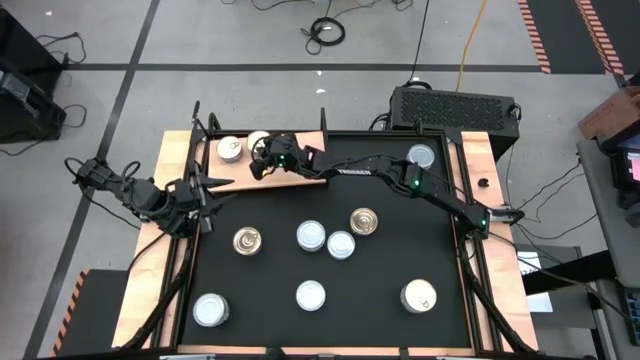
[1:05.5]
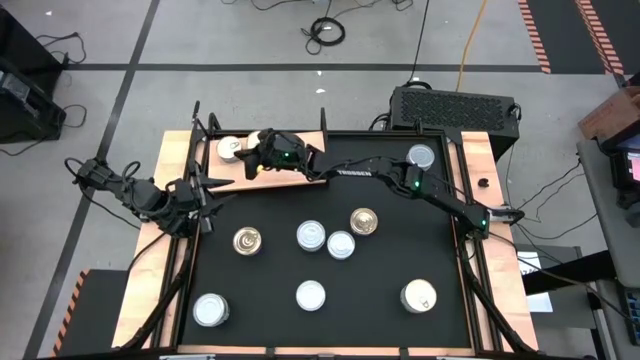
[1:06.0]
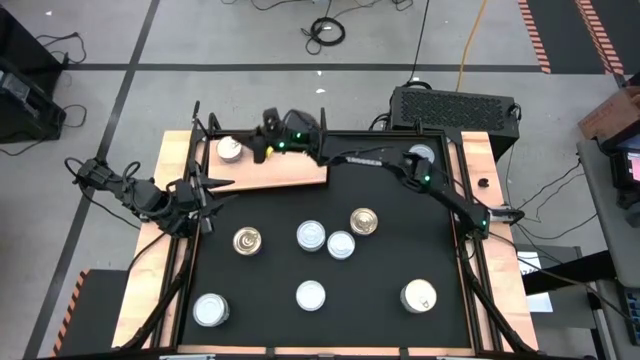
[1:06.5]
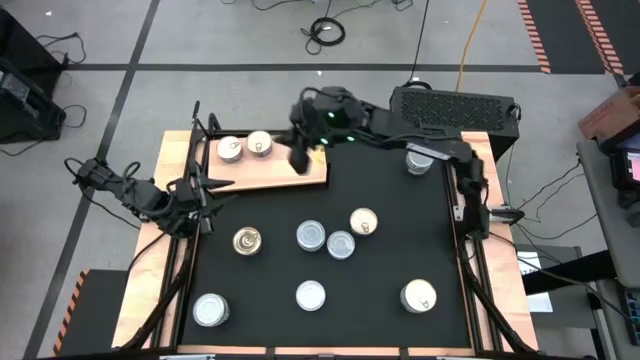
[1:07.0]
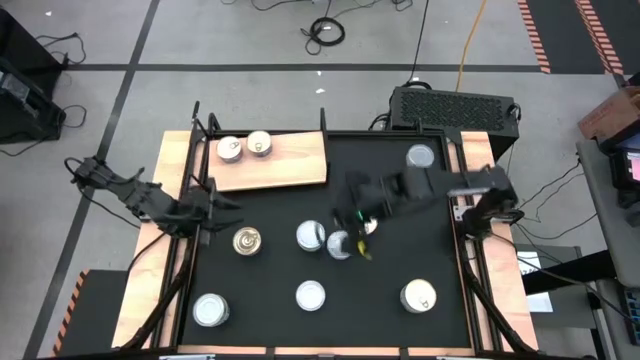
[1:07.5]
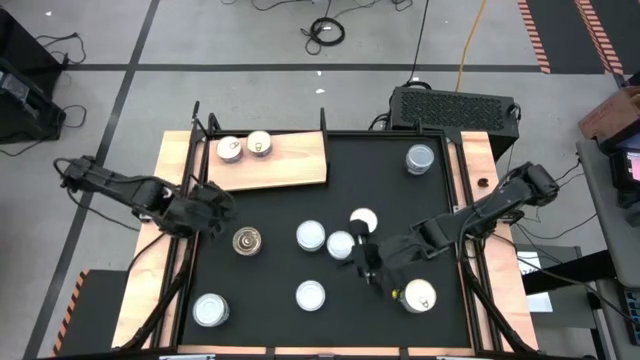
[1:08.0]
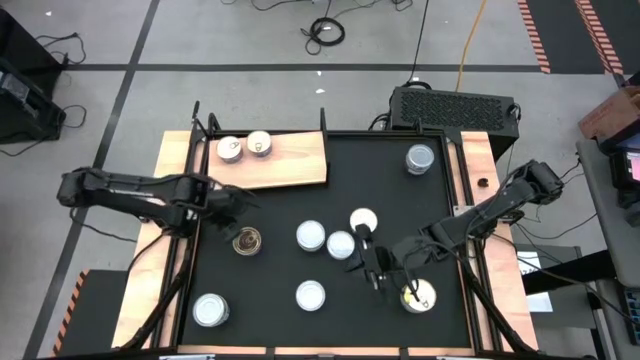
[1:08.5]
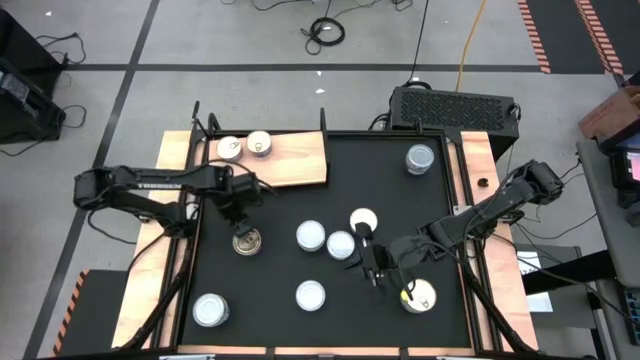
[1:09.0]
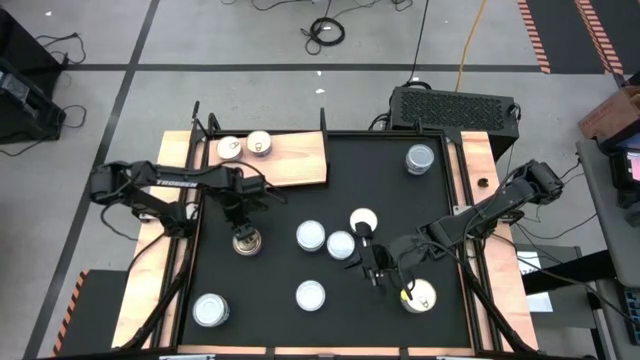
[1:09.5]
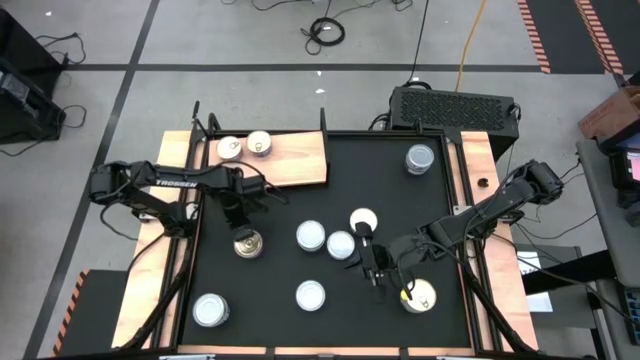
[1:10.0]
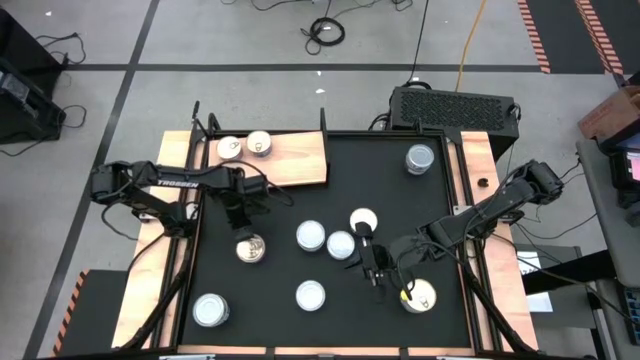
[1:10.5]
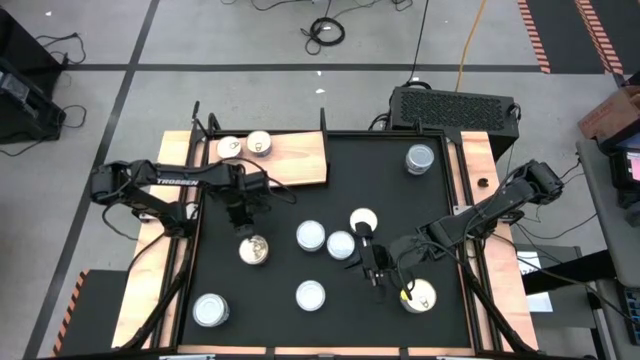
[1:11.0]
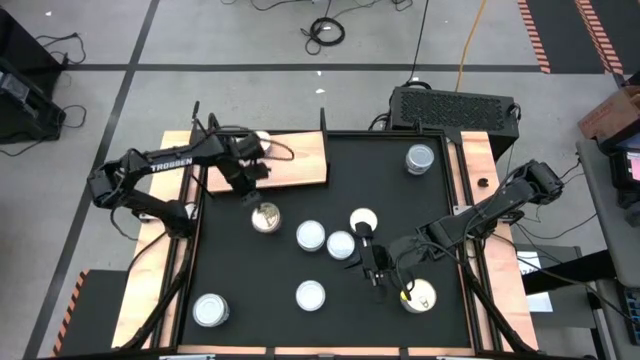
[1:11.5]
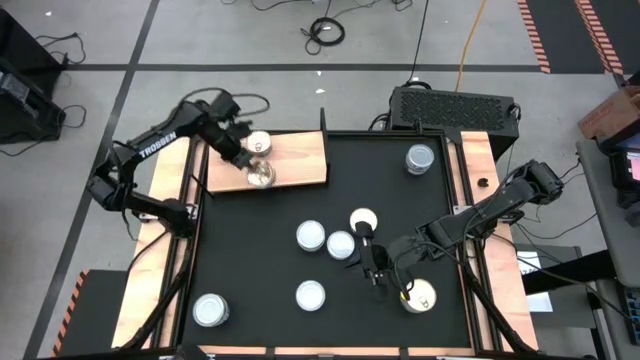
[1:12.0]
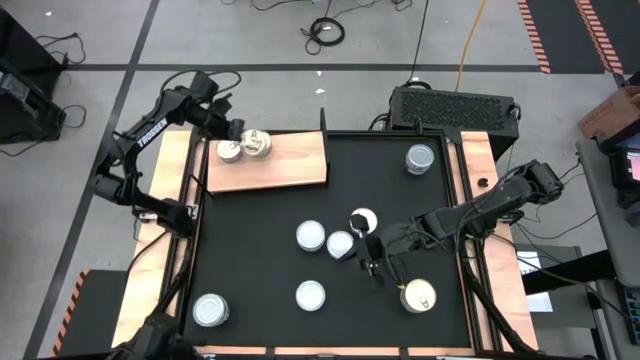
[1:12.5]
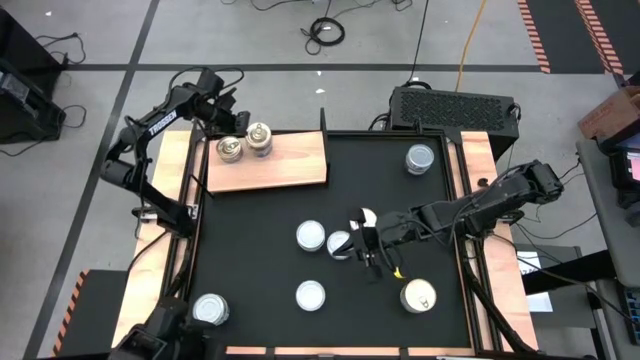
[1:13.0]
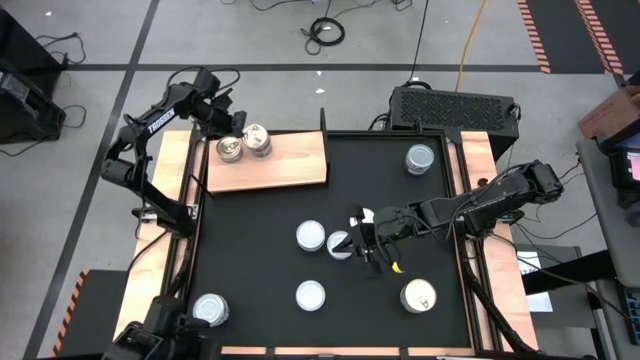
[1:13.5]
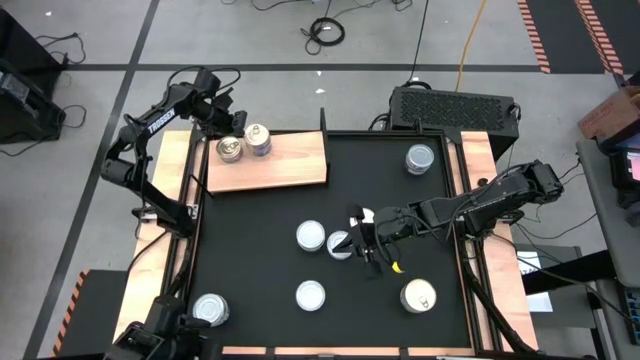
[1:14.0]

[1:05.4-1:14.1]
Task: Stack canned seafood by type on shelf
Stack the blue and pink tuna can on top of the right blue and pink tuna can on the shelf

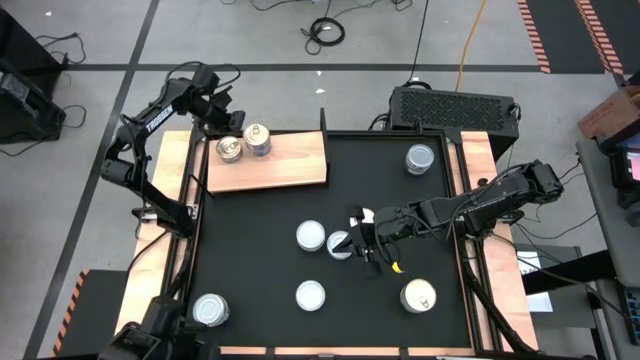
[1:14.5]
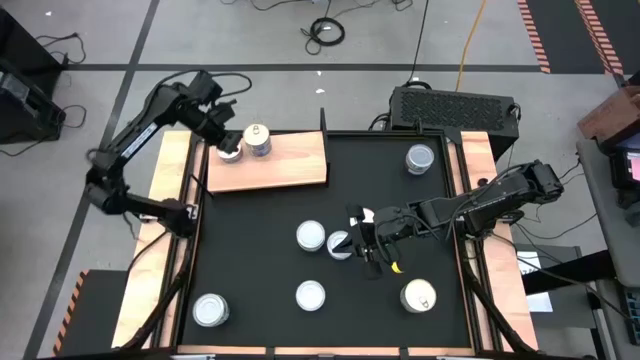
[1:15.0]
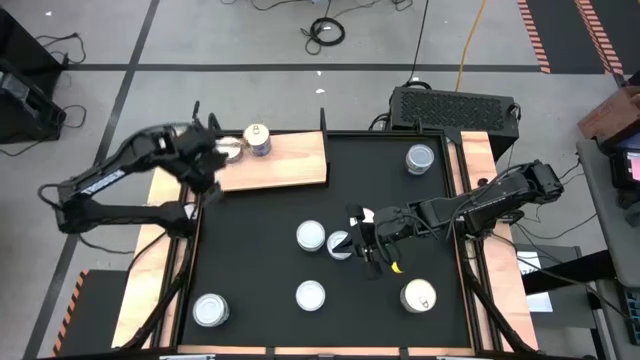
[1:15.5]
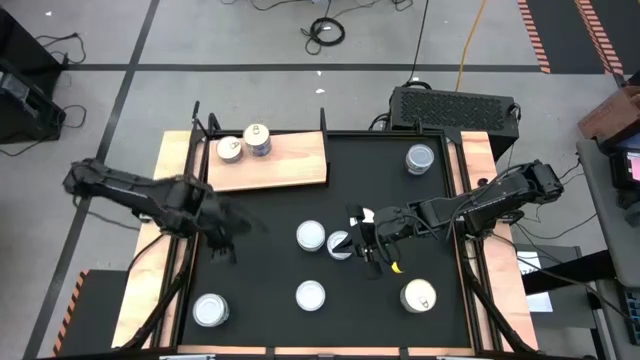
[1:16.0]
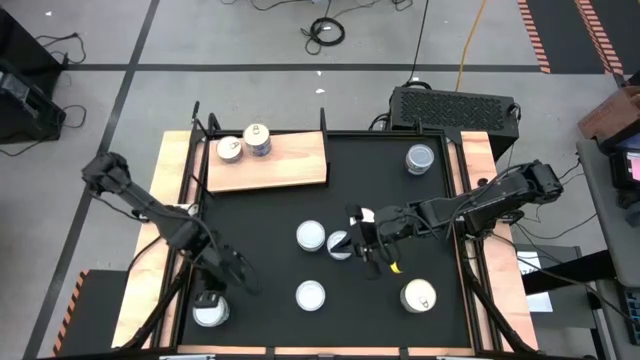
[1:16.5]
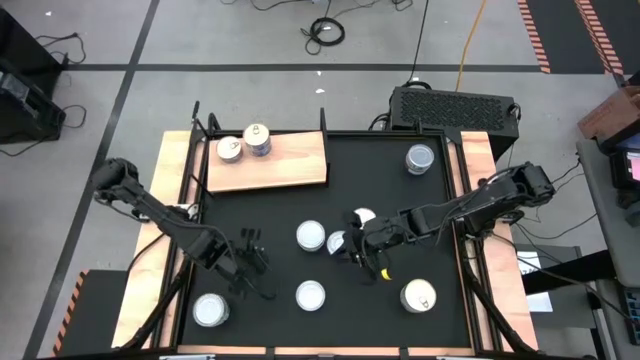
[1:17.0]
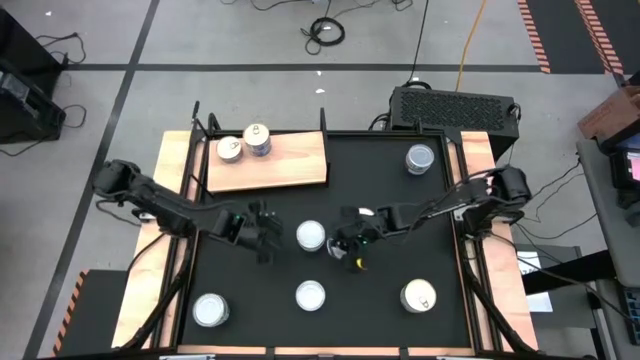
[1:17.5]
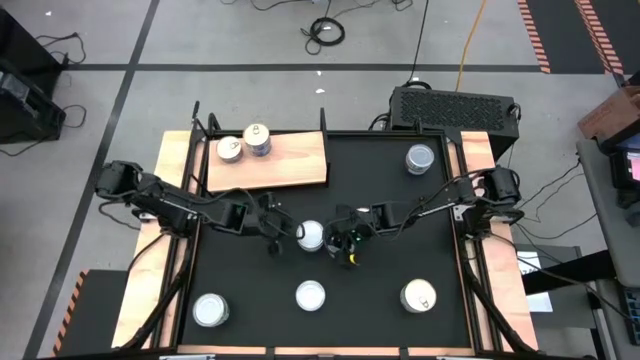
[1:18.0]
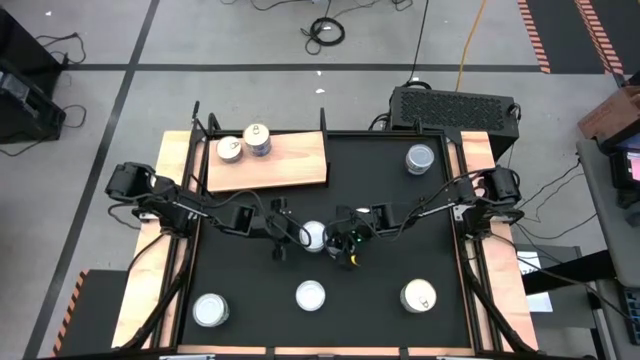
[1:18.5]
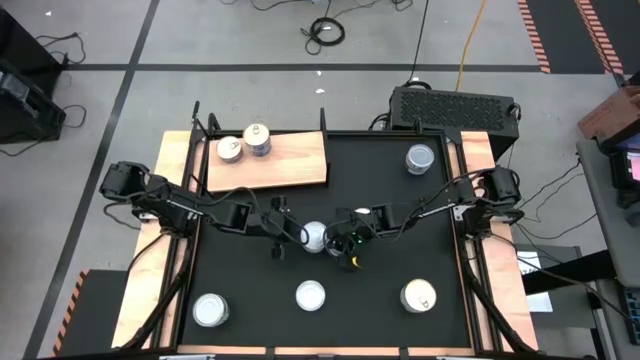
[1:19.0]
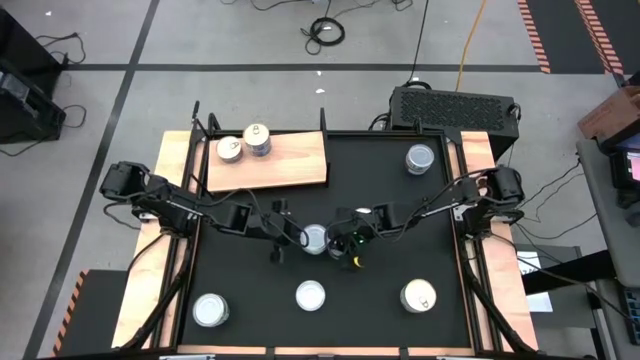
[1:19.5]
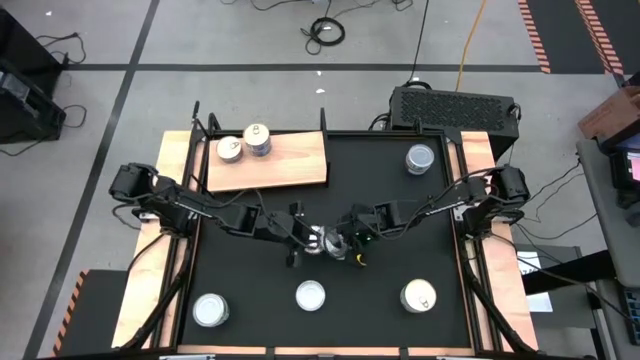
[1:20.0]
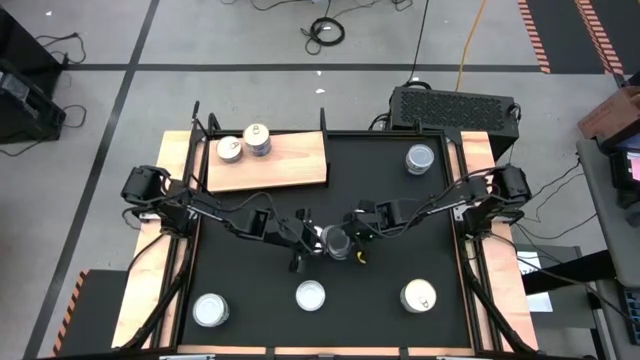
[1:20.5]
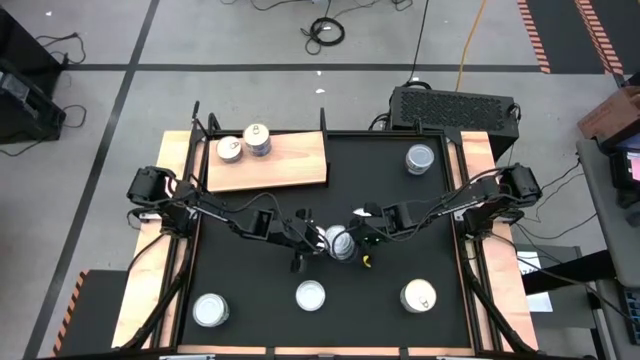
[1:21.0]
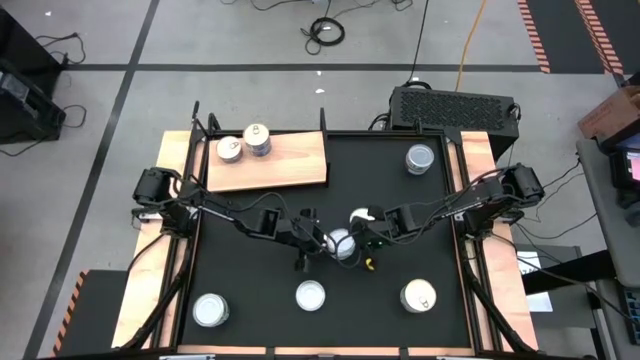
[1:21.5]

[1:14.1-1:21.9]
Remove the green and white tuna can on top of the green and white tuna can on the table

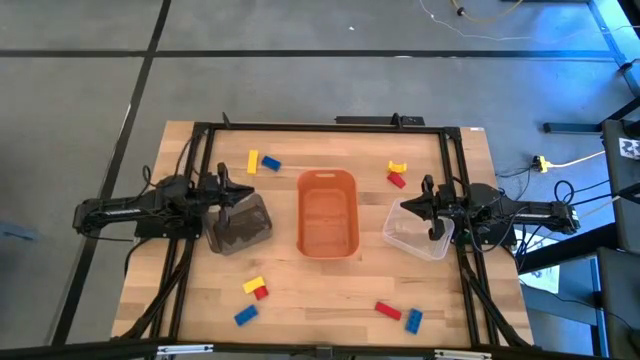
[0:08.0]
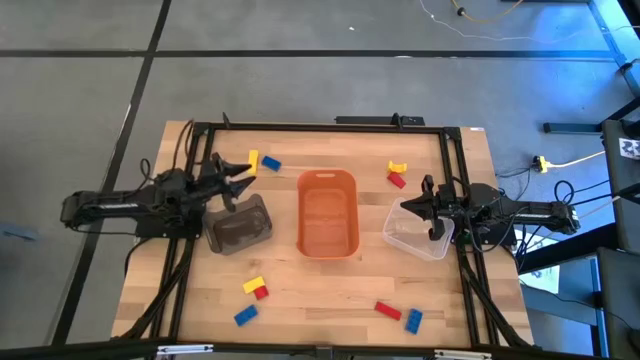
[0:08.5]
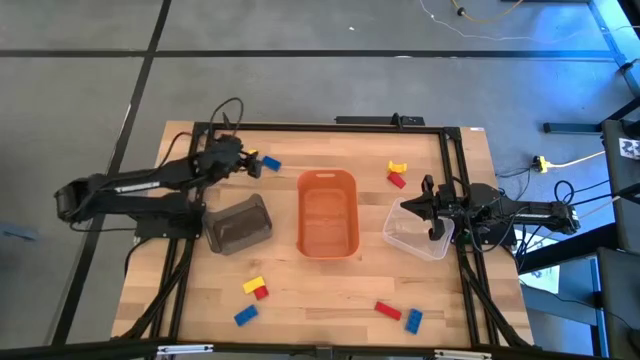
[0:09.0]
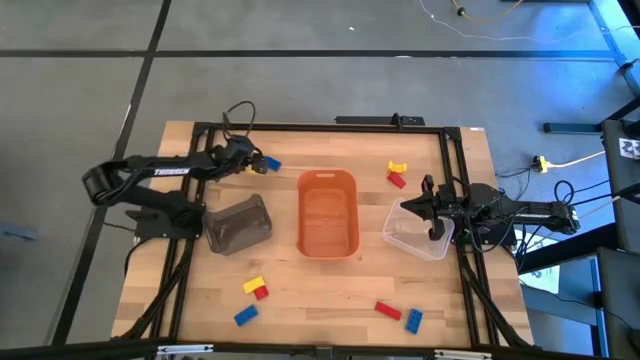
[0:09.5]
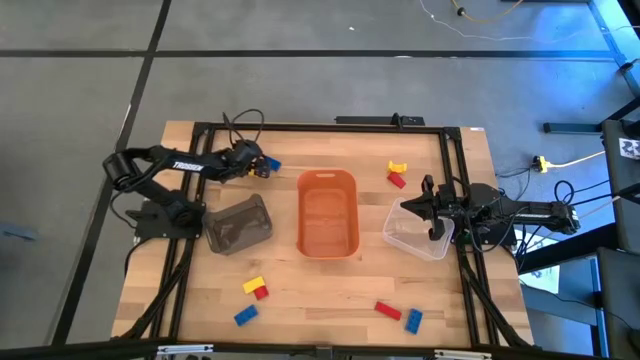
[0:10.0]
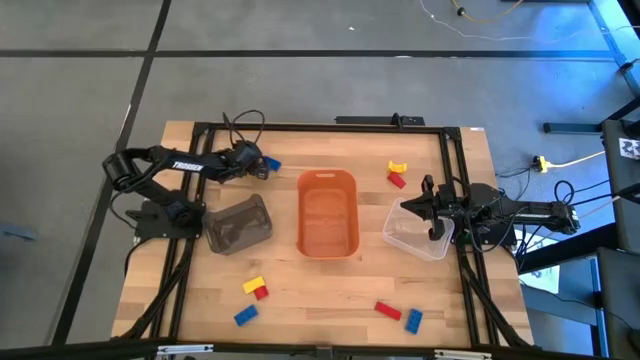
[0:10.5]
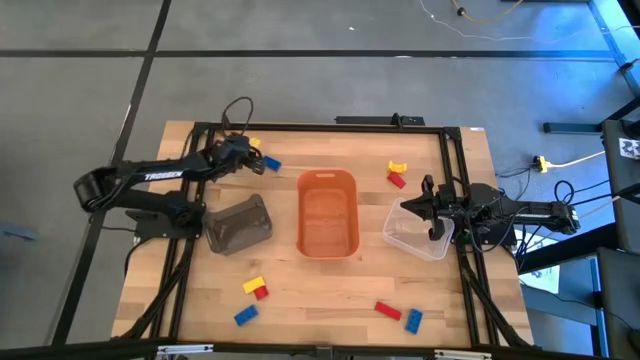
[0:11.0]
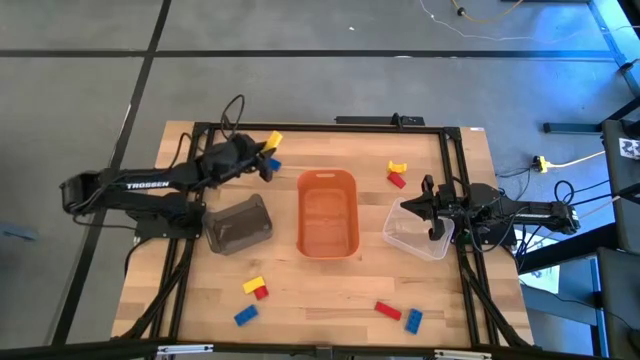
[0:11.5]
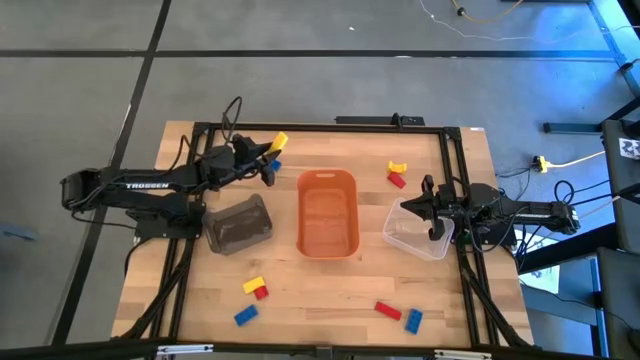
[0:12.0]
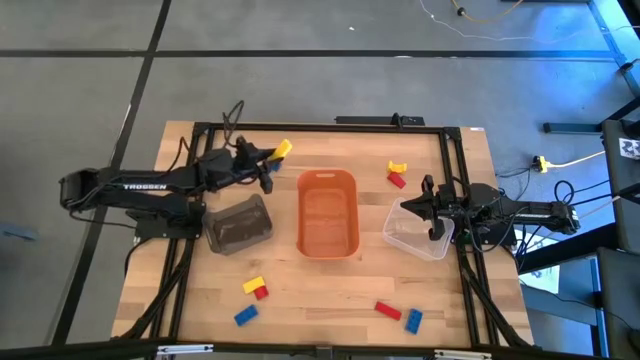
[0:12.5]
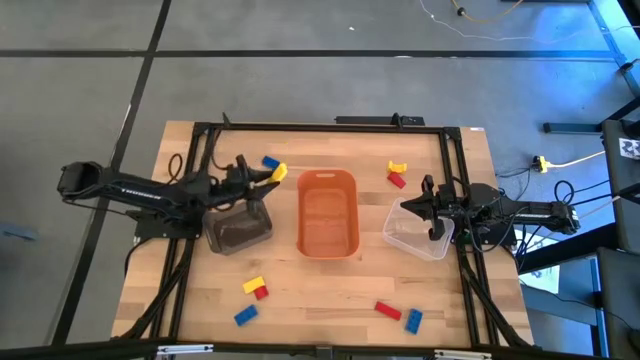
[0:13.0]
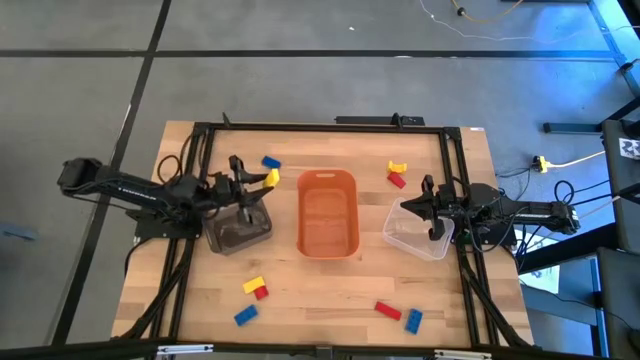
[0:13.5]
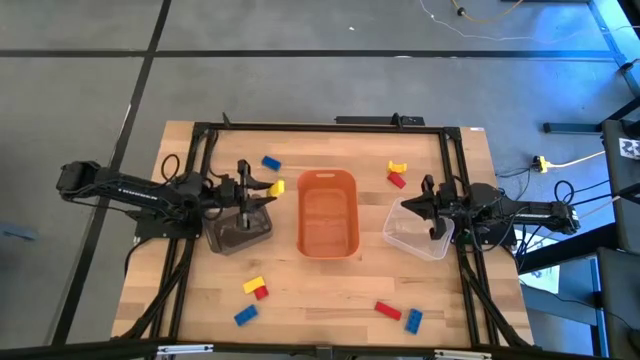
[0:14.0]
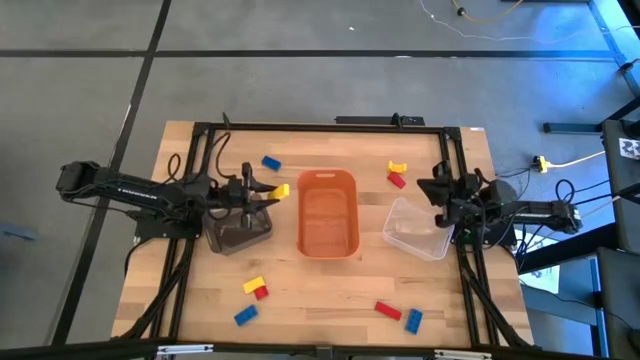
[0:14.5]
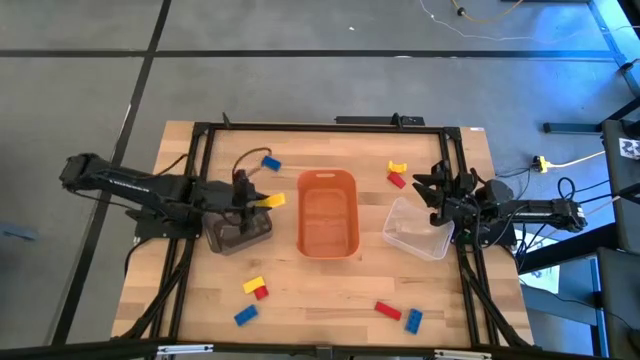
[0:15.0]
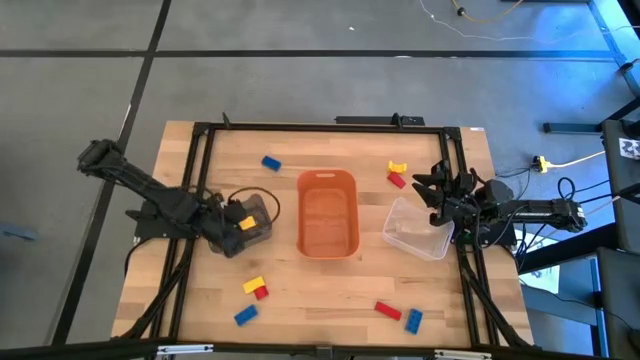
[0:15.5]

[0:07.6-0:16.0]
Task: Sort & place blocks by color
Put the top left yellow block into the black bin
